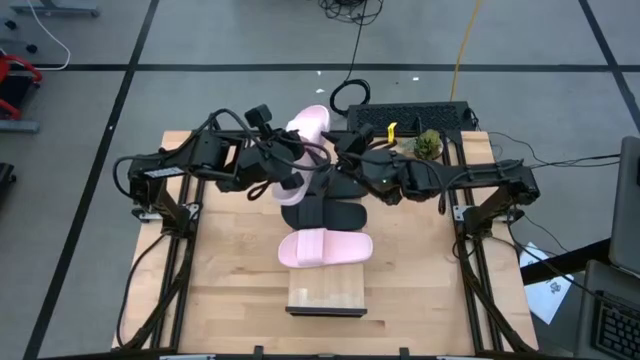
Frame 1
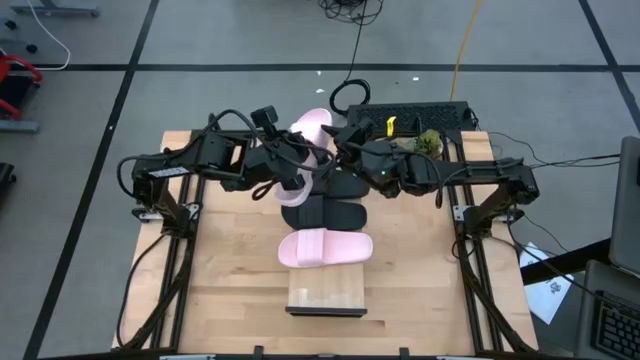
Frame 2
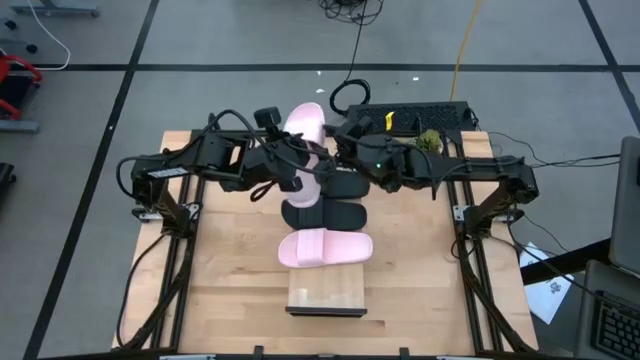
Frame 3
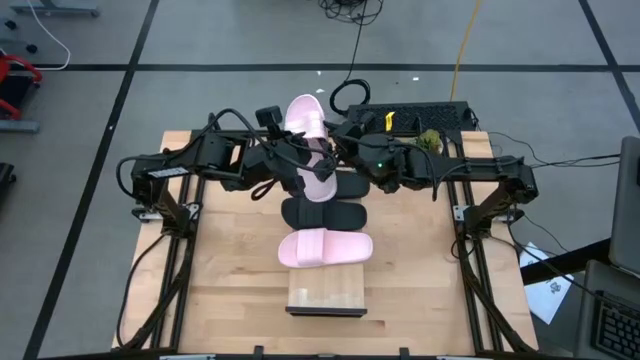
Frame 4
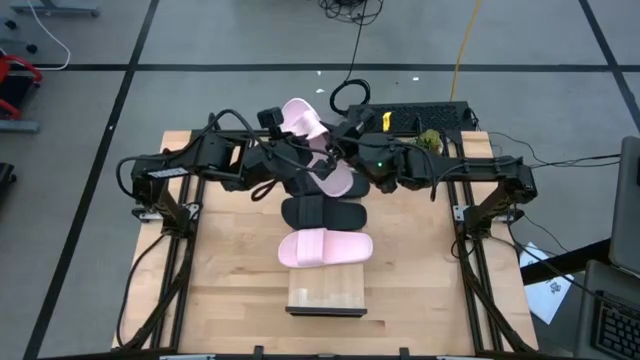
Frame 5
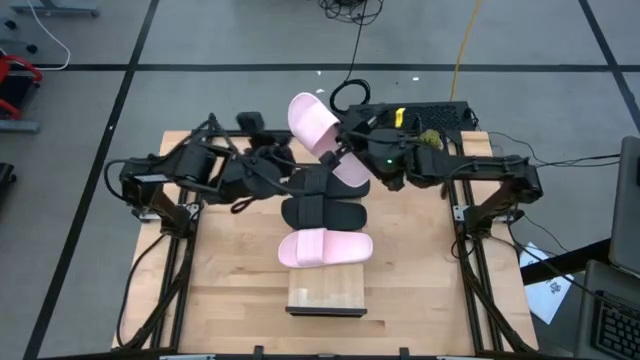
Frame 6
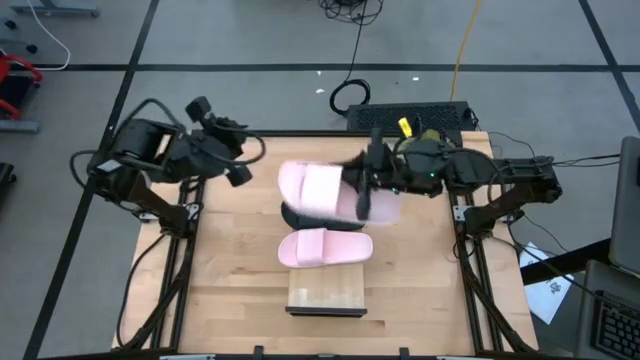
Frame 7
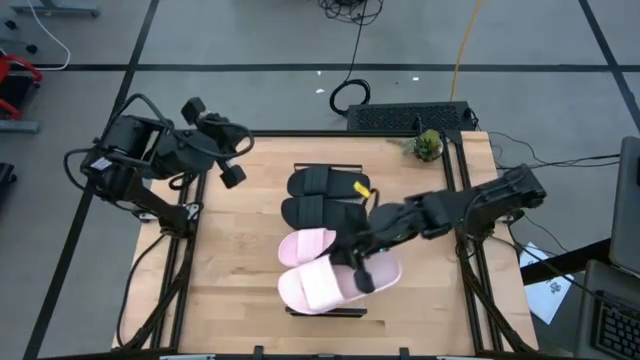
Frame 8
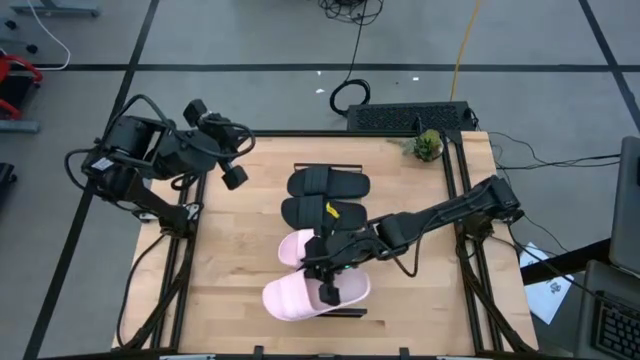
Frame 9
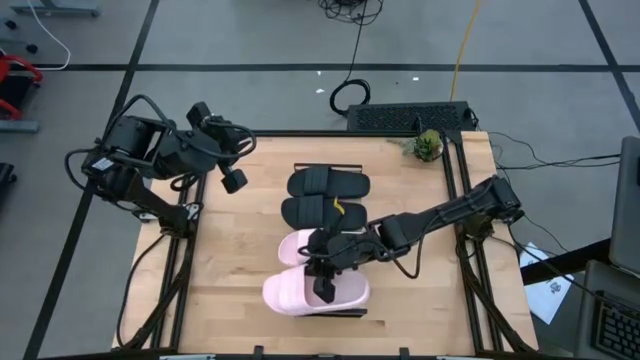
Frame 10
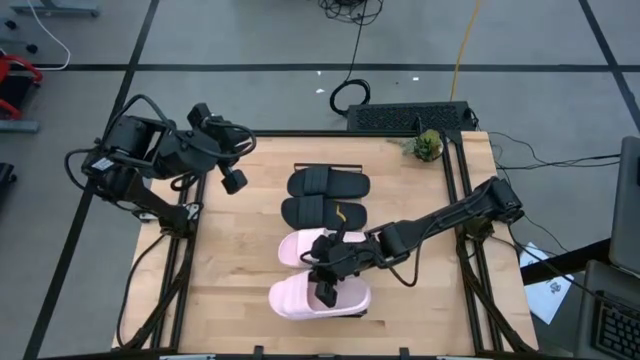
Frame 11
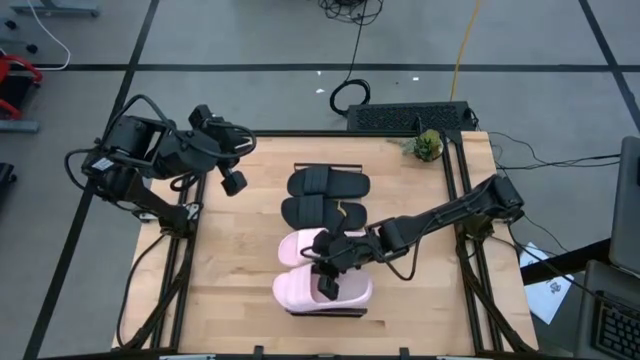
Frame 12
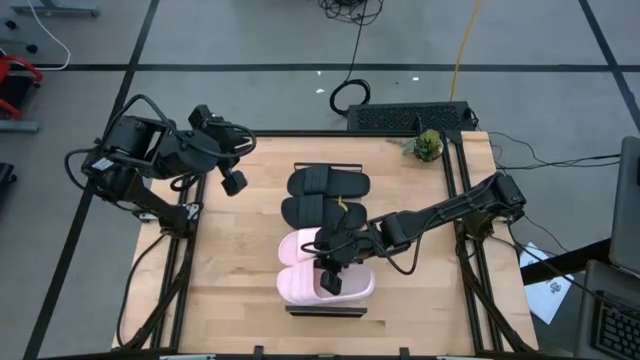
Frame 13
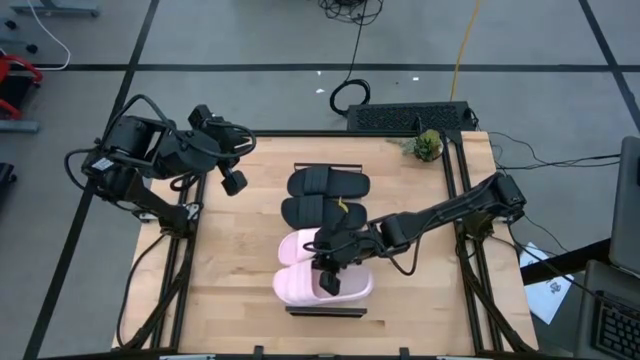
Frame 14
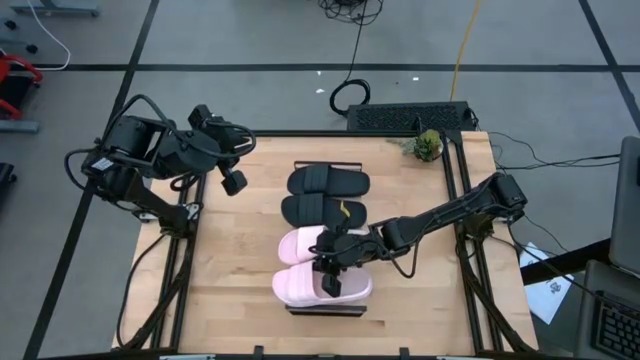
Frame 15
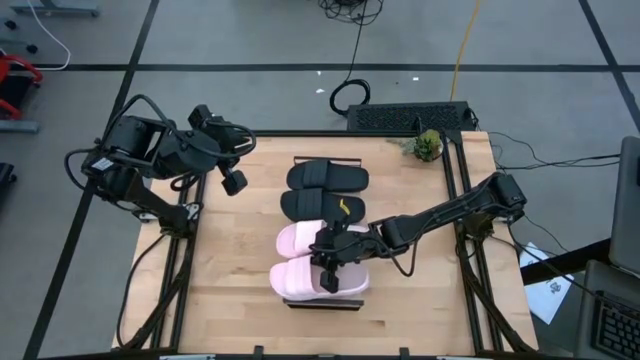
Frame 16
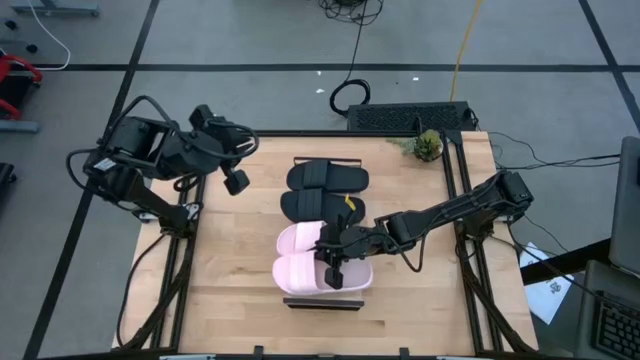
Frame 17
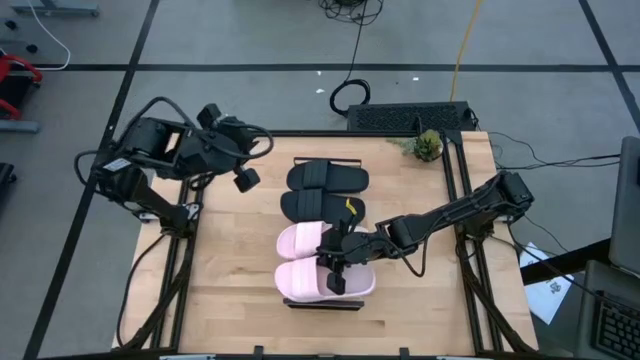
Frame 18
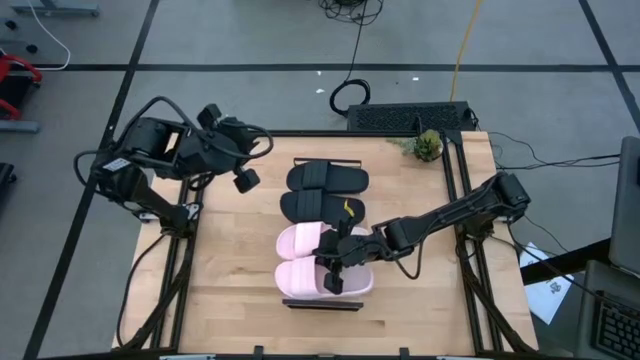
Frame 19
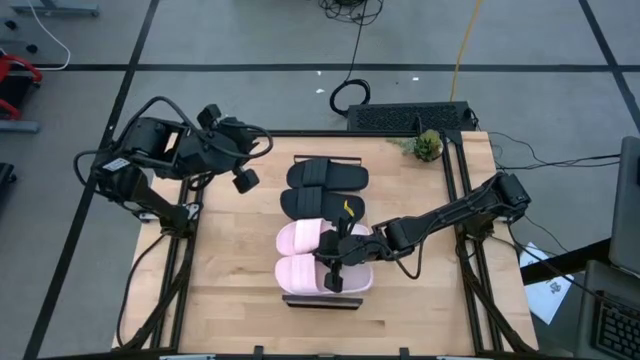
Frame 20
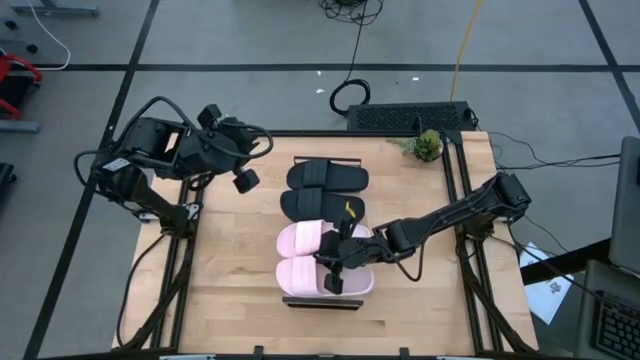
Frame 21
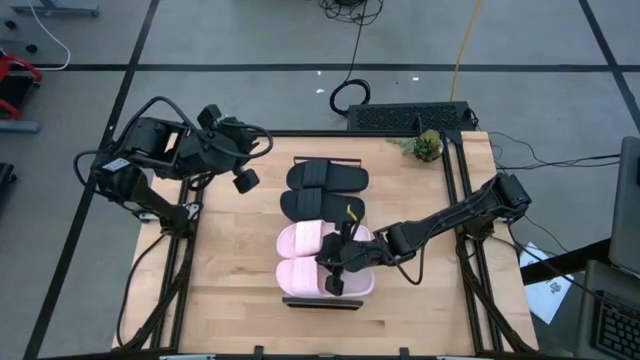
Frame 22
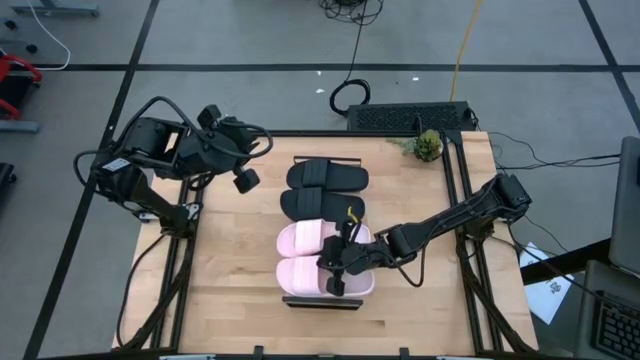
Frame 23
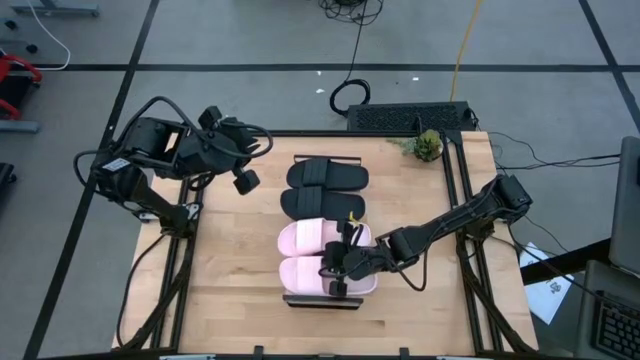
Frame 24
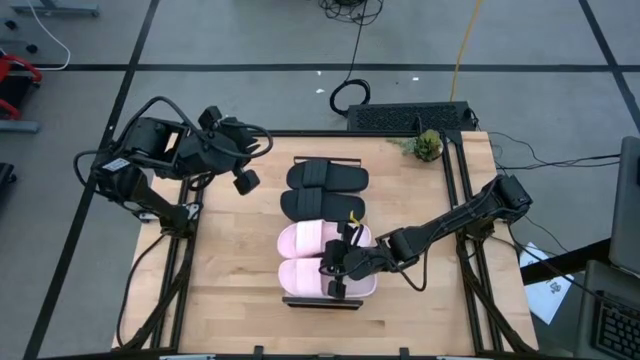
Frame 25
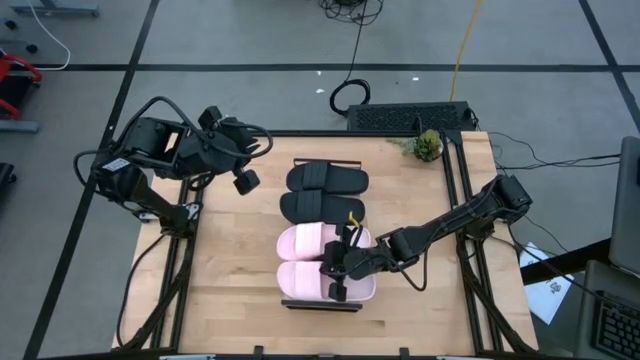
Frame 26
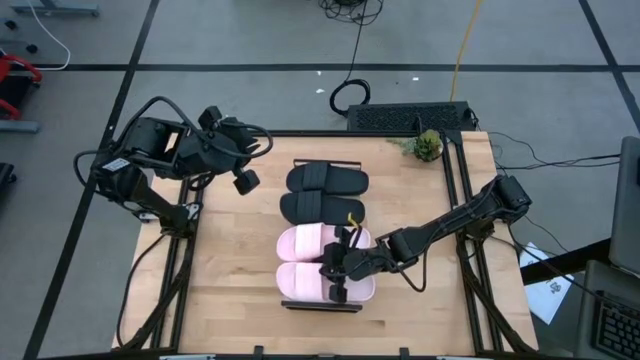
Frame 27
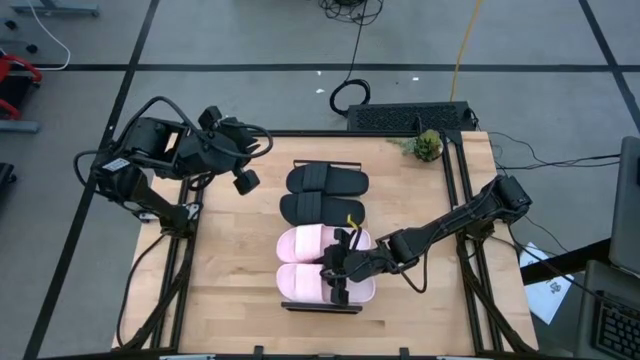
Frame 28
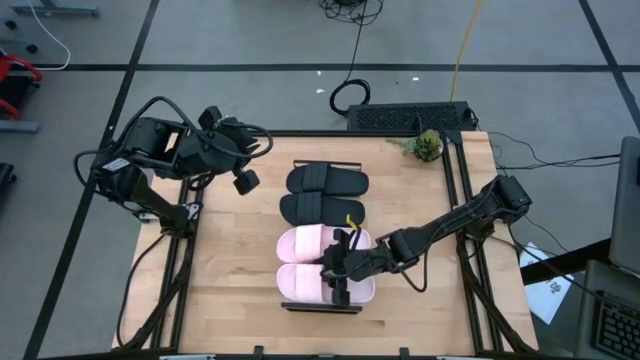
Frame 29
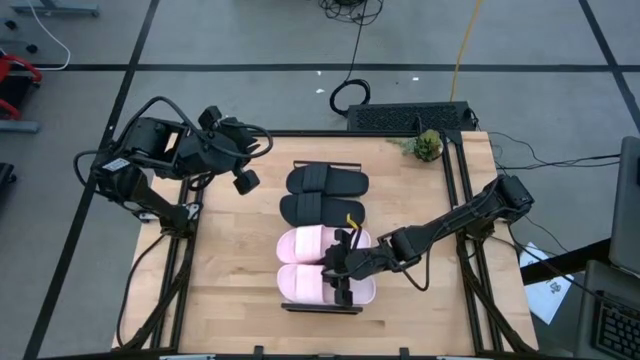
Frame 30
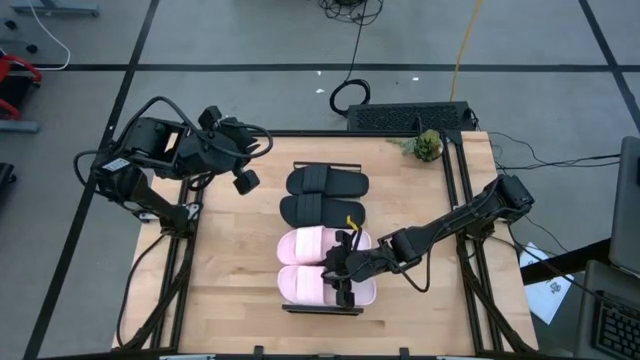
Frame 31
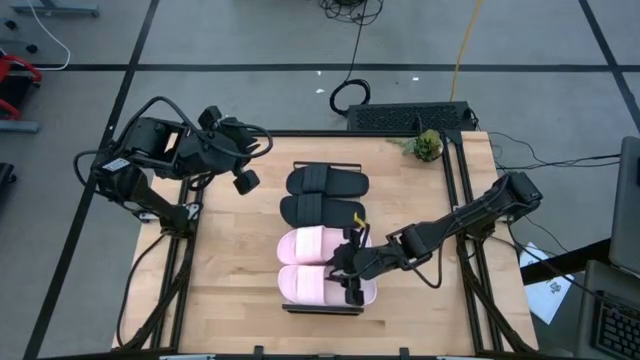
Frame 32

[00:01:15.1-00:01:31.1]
Task: Pick and place slides into the shelf
Put the pink slide on the shelf

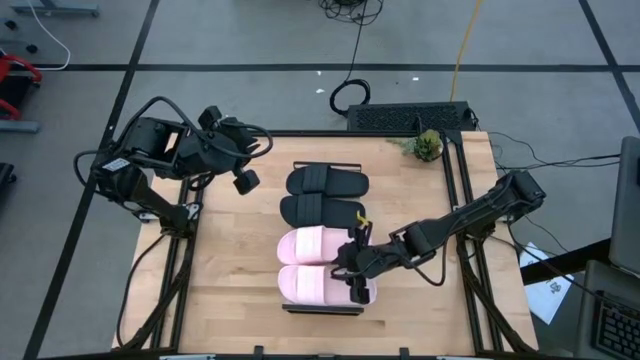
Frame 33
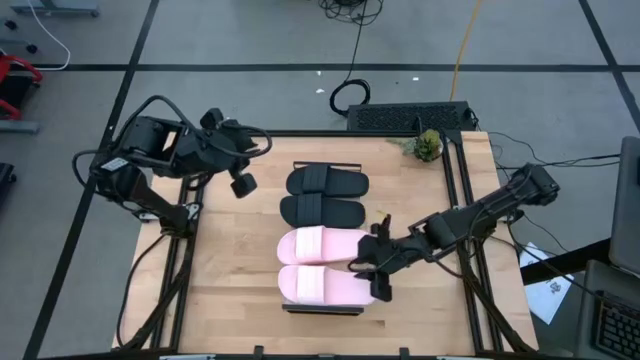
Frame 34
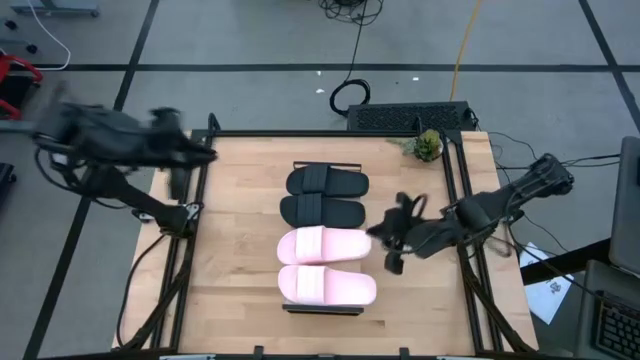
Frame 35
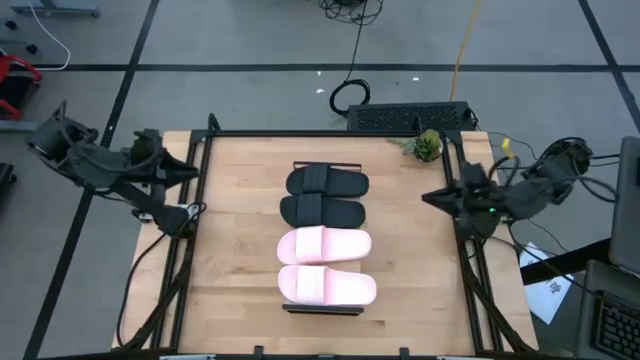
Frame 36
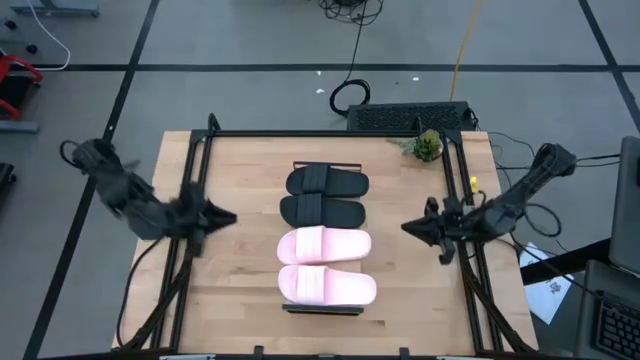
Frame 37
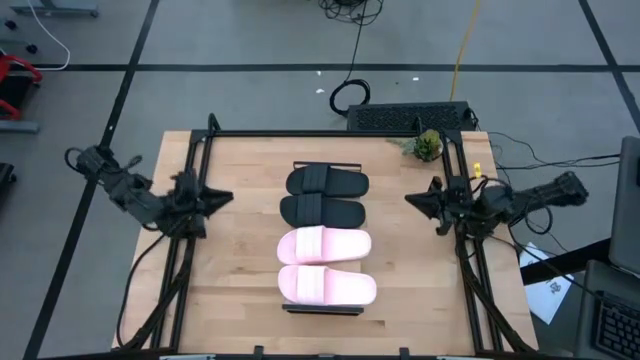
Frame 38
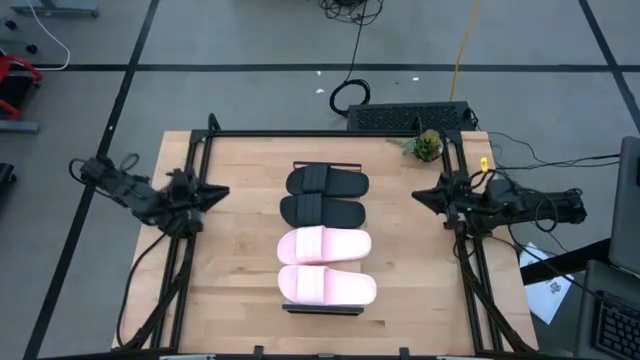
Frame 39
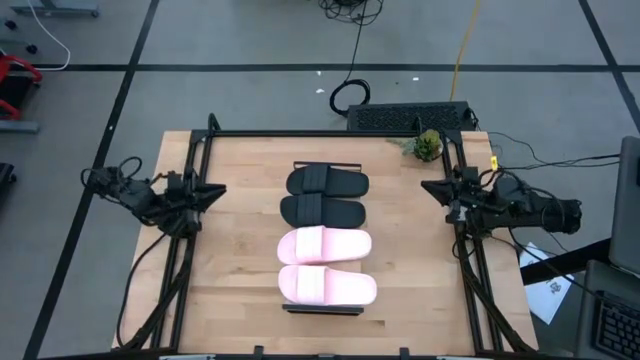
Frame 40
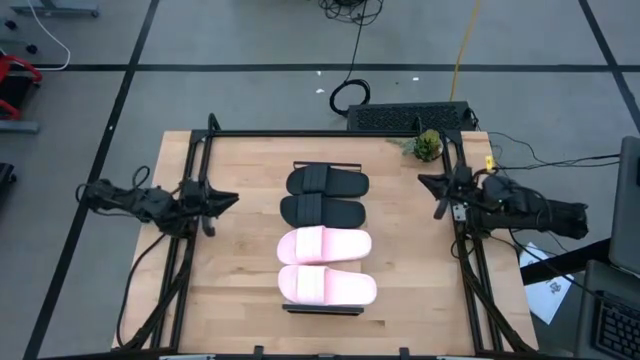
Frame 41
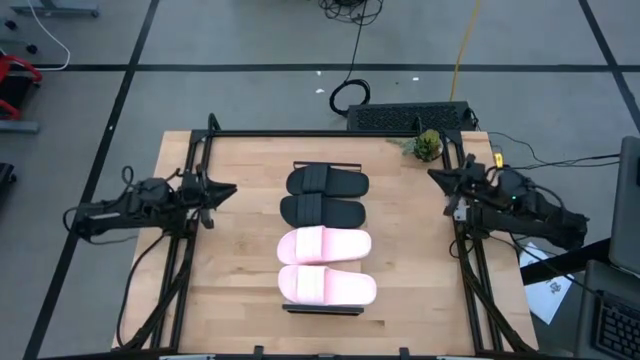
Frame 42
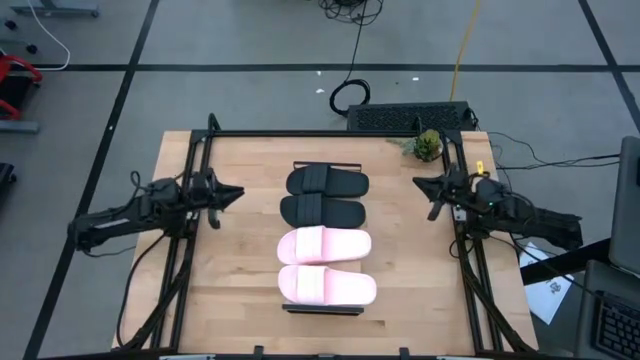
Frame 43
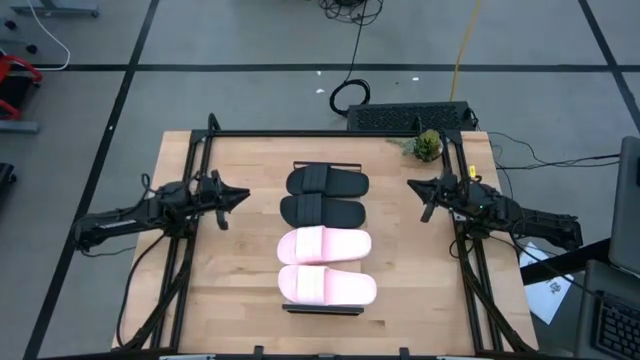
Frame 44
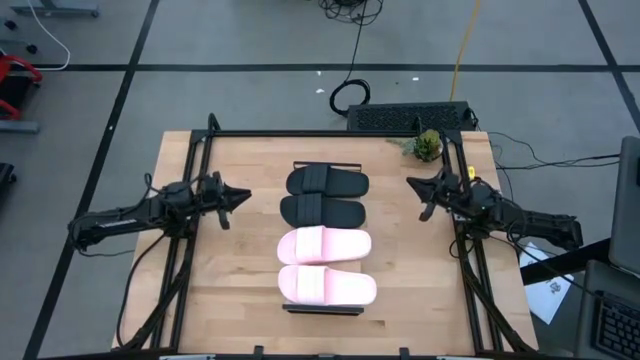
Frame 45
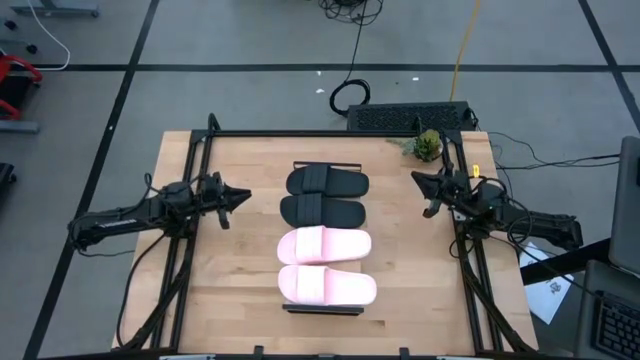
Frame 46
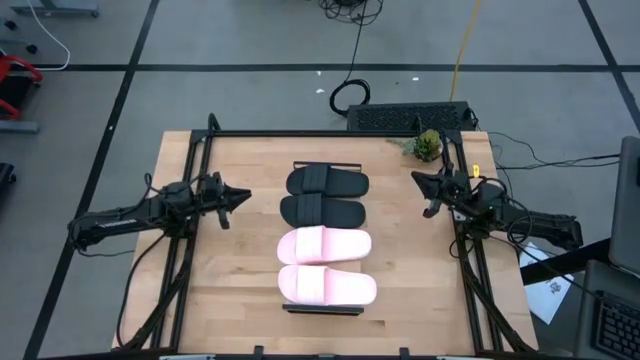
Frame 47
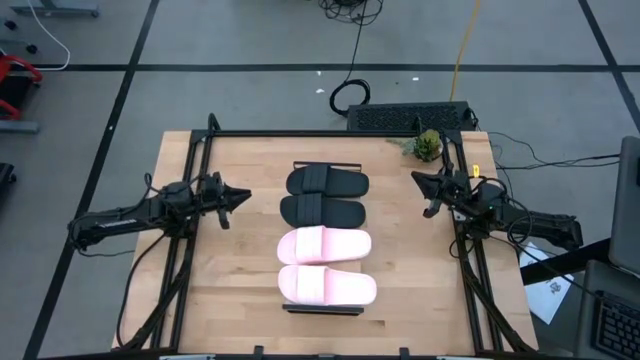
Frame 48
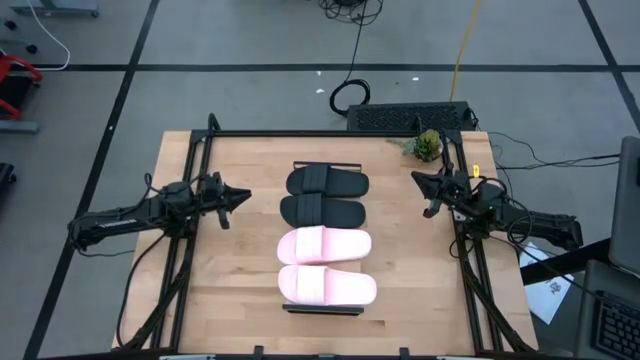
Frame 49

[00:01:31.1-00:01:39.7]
Return to Home Position
